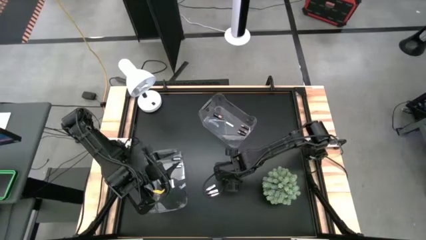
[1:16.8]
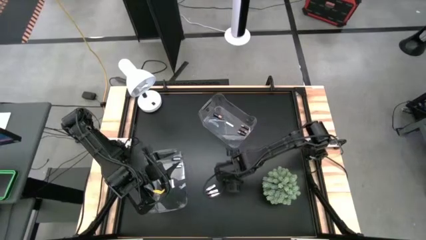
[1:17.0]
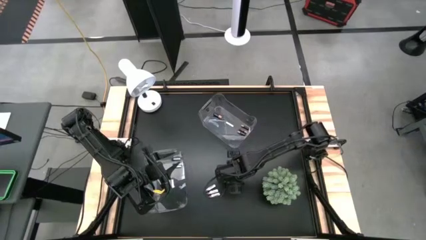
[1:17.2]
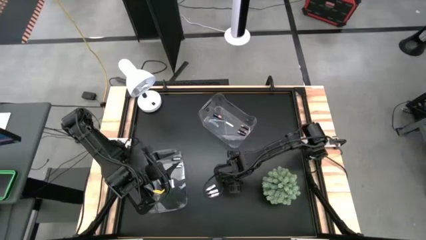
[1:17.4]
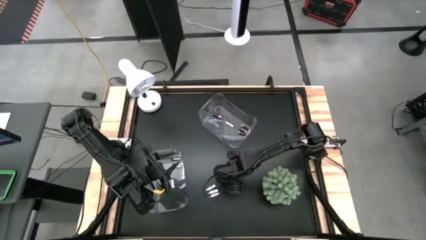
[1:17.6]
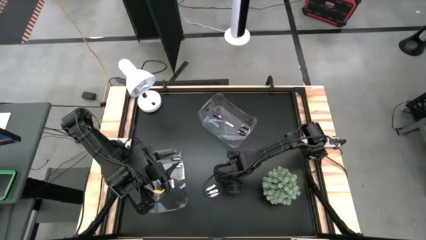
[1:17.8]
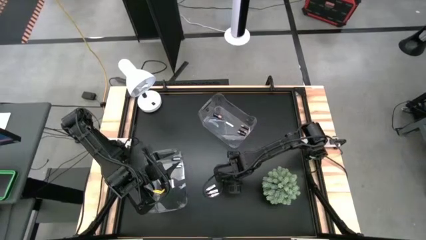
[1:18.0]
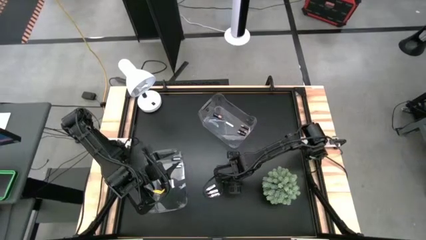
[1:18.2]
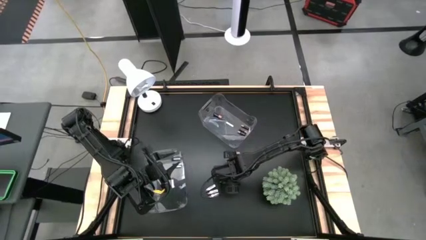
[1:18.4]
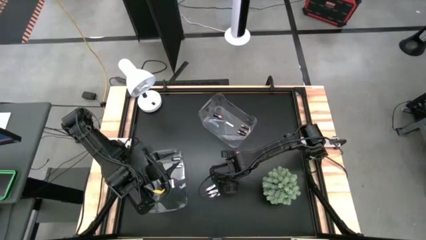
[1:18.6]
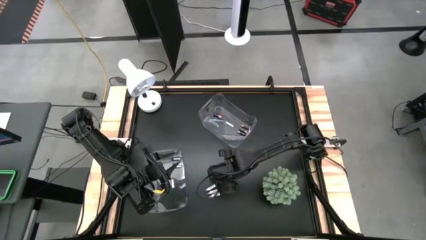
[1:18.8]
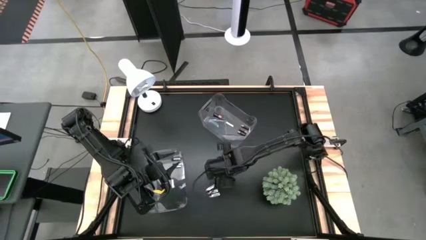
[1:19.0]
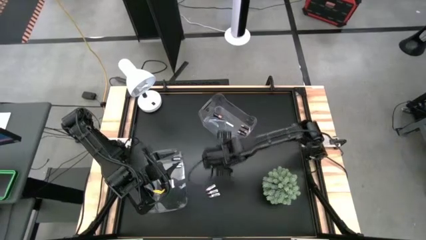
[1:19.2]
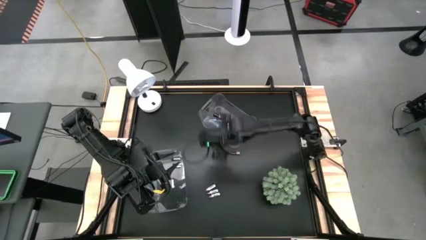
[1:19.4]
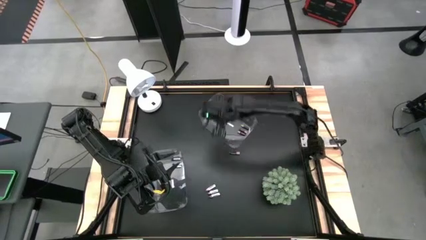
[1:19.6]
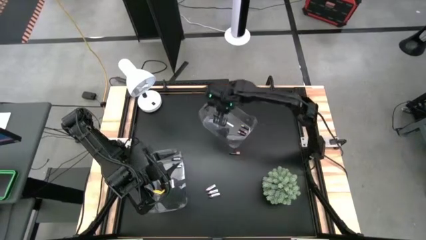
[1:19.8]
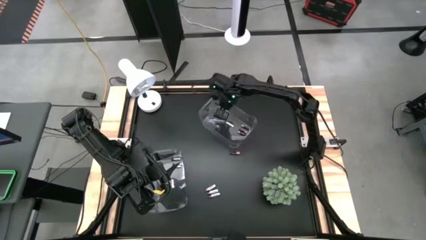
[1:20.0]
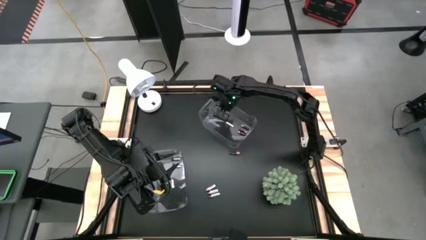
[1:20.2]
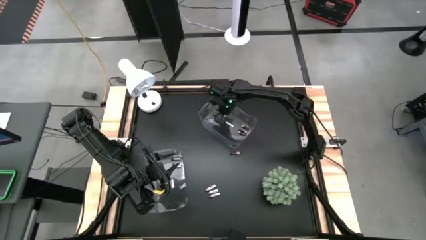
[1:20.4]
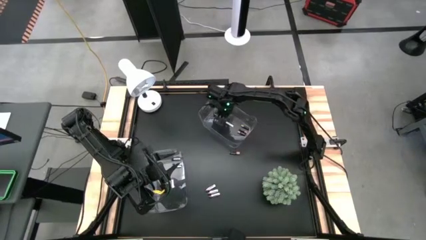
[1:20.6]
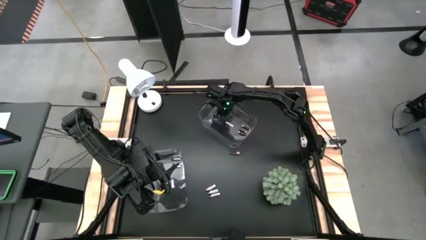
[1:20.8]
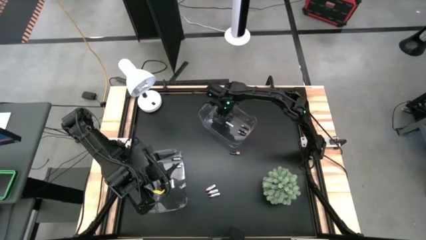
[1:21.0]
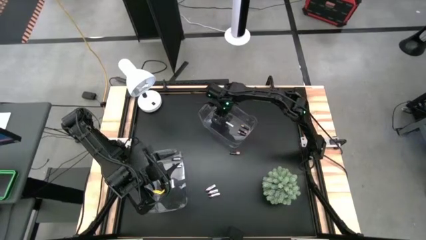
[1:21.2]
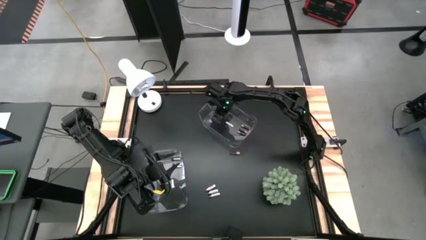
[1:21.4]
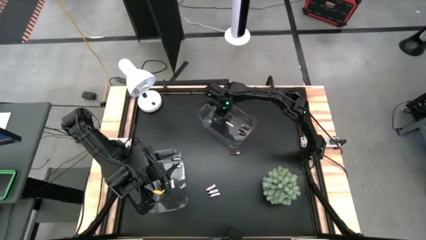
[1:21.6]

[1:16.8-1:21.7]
Task: Sort batteries
Put the black battery into the top transparent bin

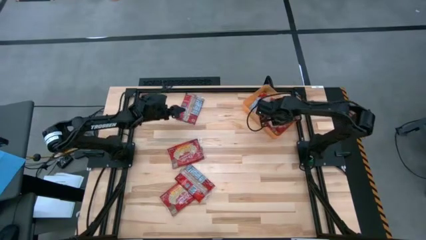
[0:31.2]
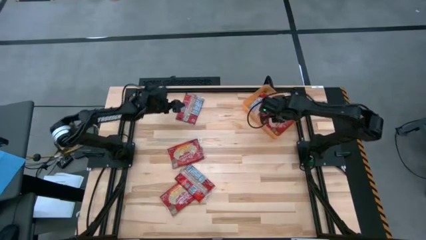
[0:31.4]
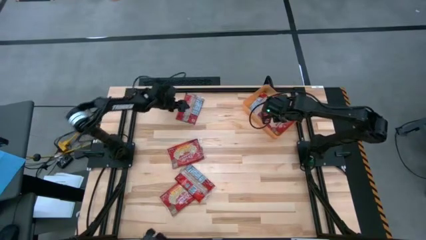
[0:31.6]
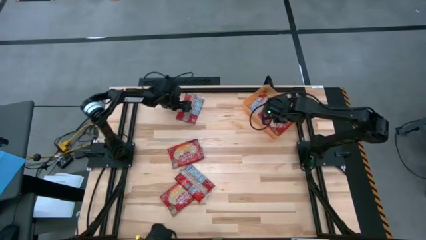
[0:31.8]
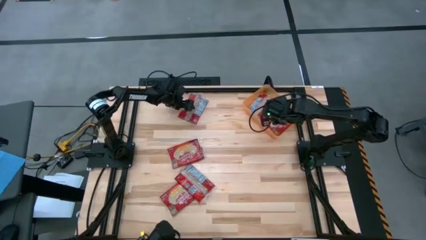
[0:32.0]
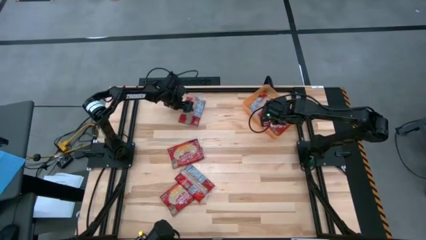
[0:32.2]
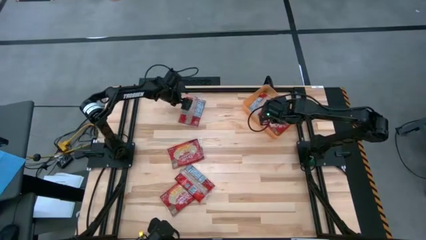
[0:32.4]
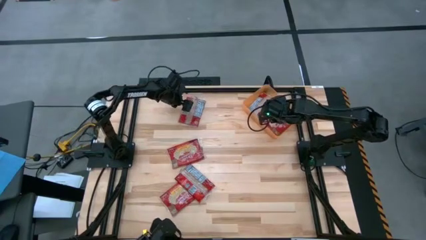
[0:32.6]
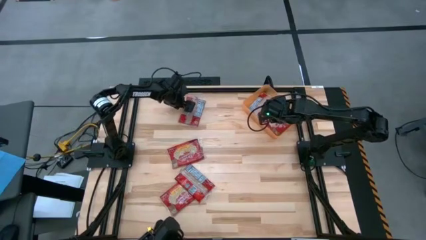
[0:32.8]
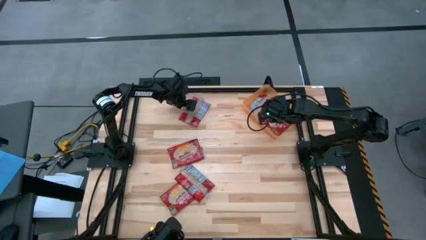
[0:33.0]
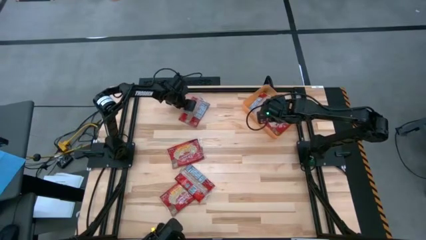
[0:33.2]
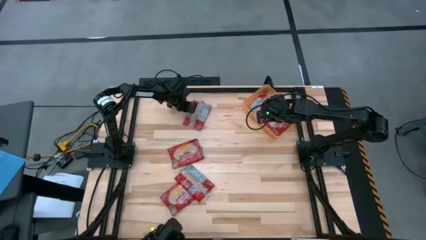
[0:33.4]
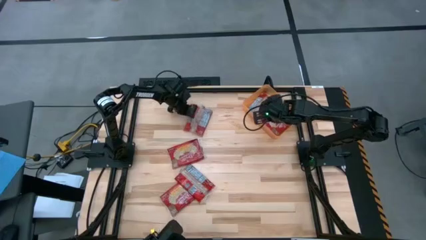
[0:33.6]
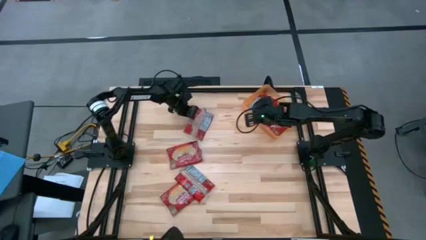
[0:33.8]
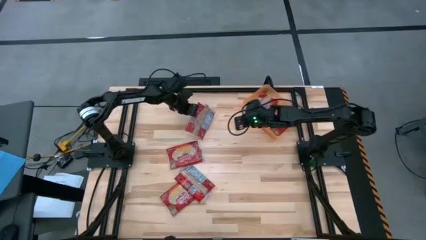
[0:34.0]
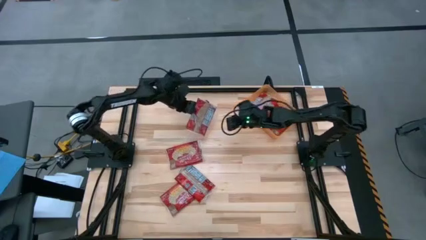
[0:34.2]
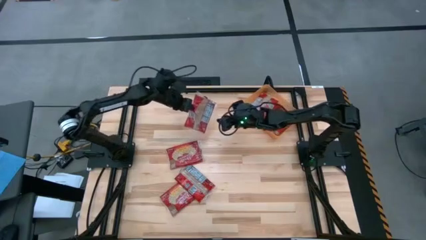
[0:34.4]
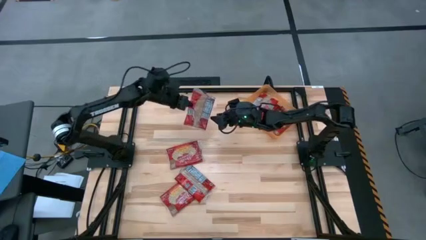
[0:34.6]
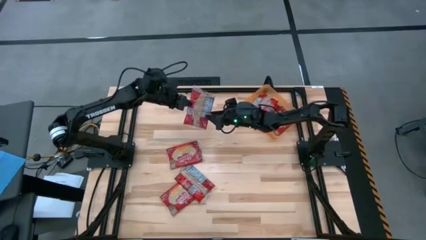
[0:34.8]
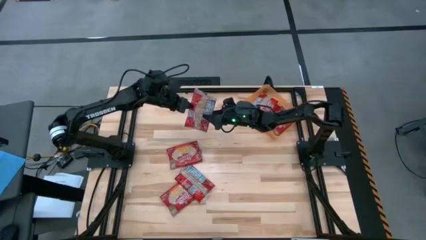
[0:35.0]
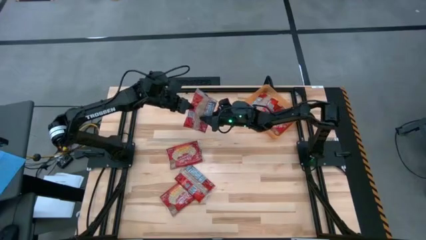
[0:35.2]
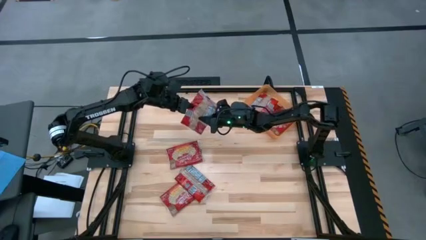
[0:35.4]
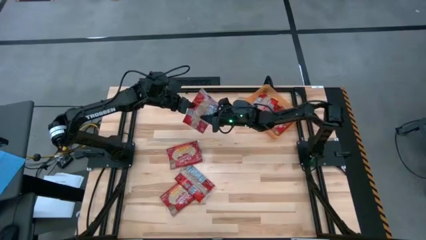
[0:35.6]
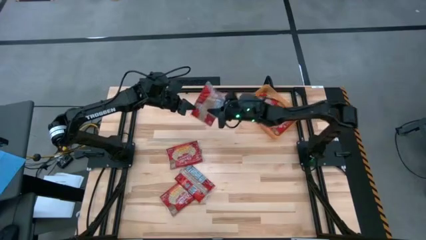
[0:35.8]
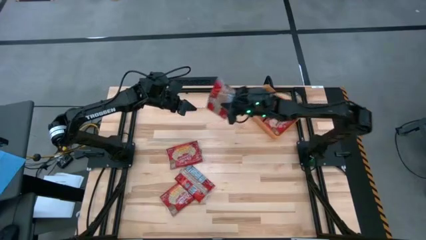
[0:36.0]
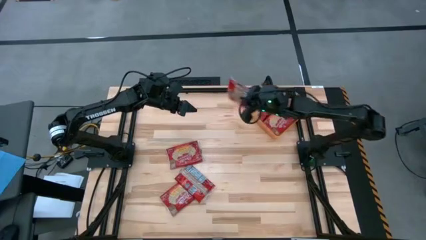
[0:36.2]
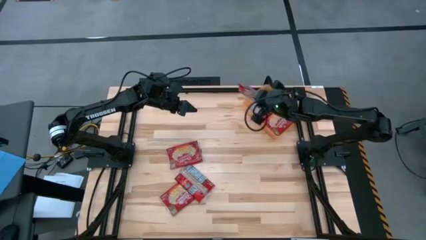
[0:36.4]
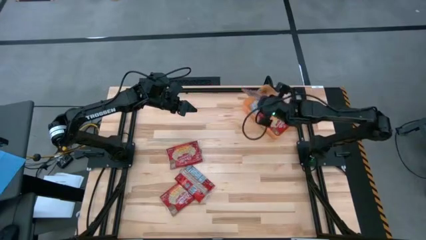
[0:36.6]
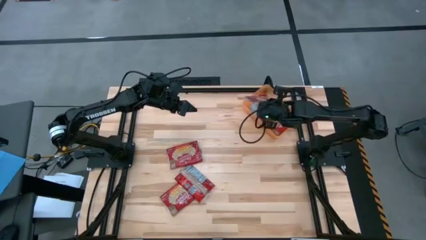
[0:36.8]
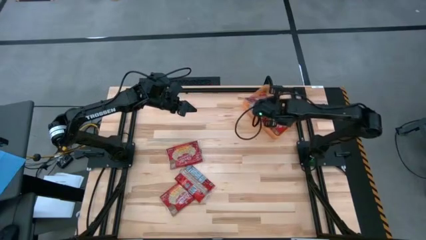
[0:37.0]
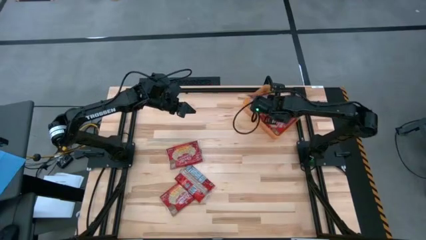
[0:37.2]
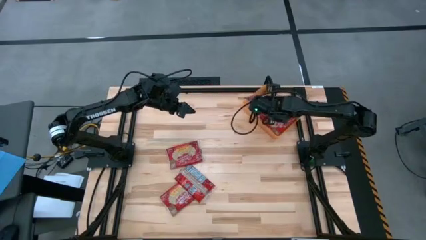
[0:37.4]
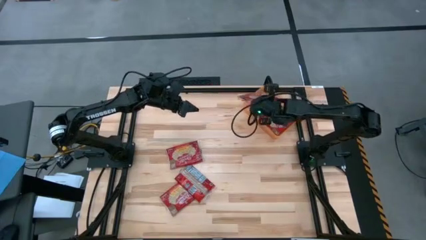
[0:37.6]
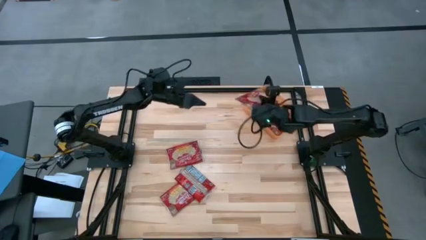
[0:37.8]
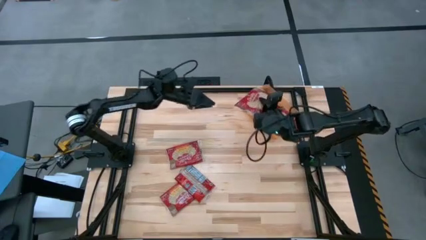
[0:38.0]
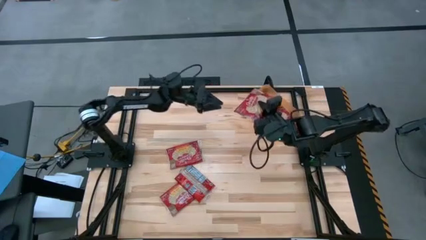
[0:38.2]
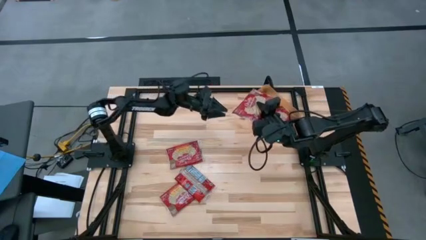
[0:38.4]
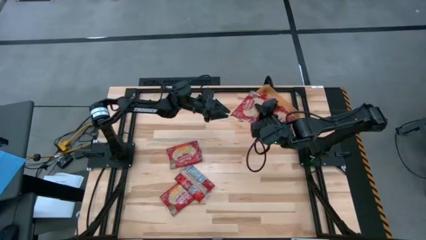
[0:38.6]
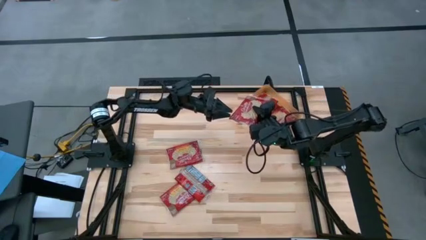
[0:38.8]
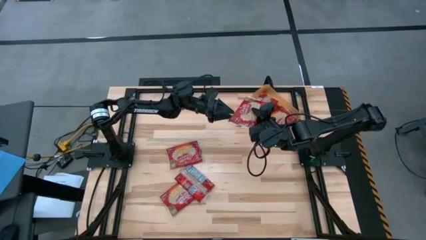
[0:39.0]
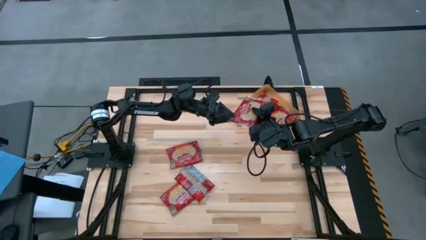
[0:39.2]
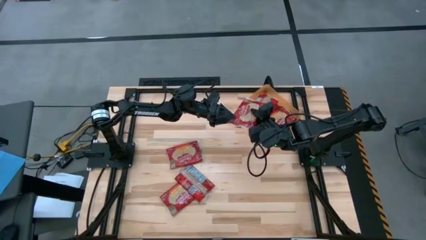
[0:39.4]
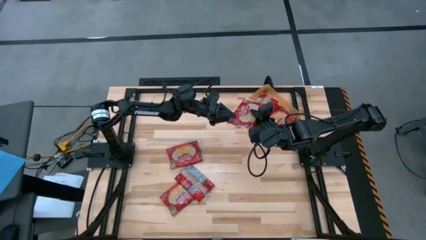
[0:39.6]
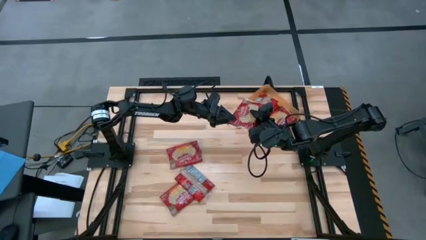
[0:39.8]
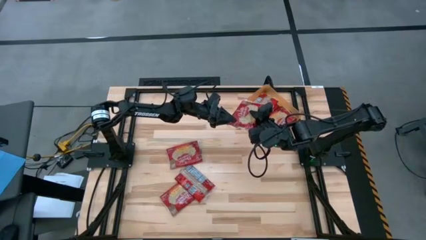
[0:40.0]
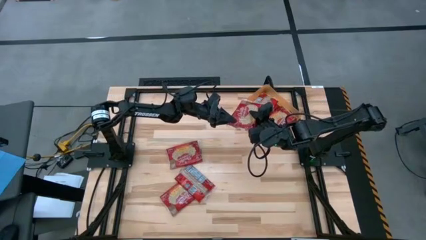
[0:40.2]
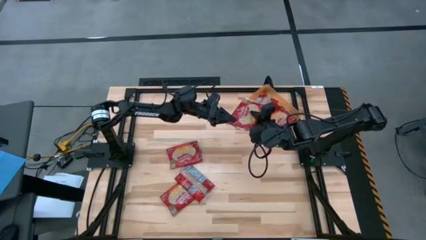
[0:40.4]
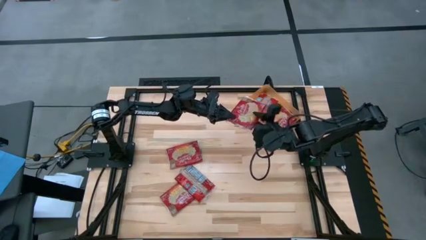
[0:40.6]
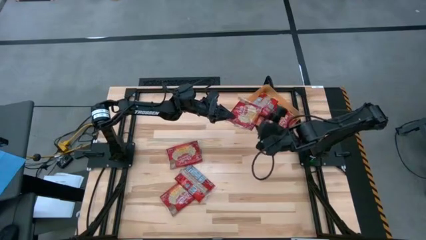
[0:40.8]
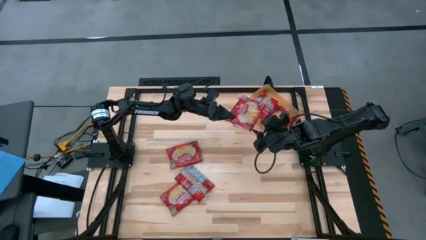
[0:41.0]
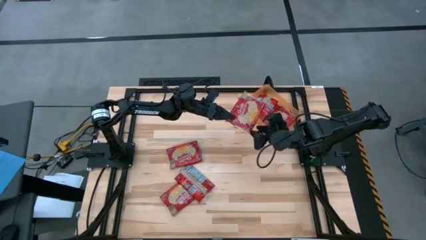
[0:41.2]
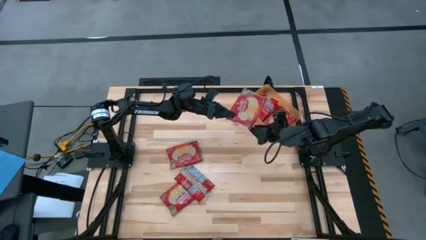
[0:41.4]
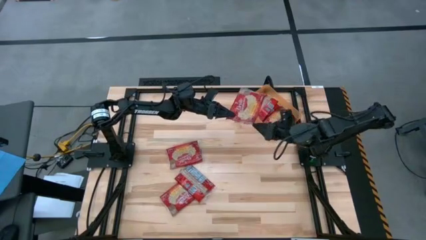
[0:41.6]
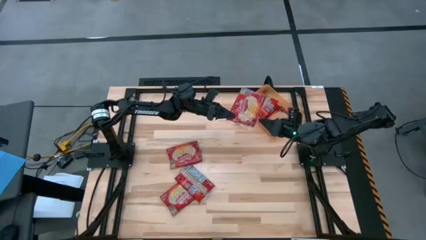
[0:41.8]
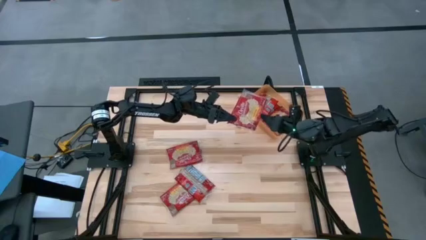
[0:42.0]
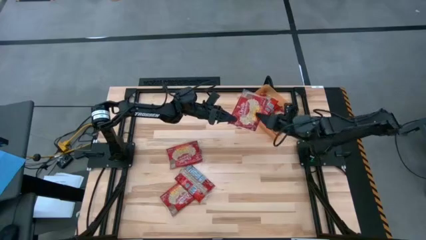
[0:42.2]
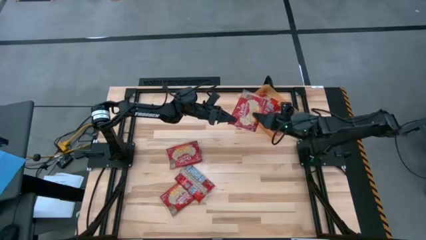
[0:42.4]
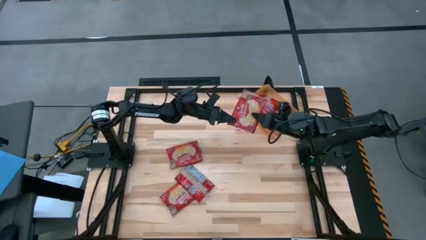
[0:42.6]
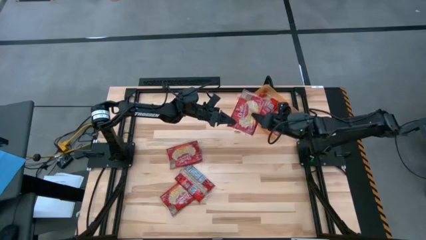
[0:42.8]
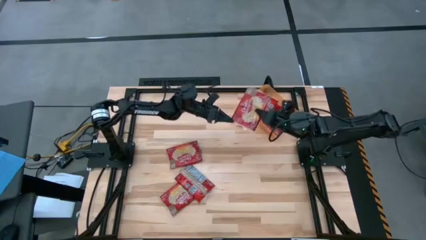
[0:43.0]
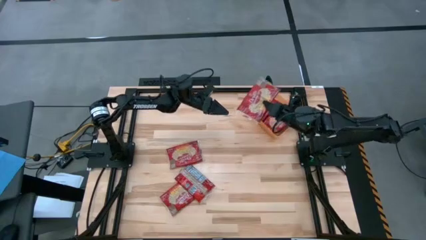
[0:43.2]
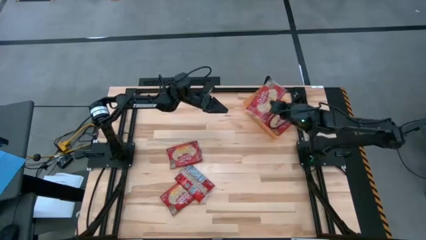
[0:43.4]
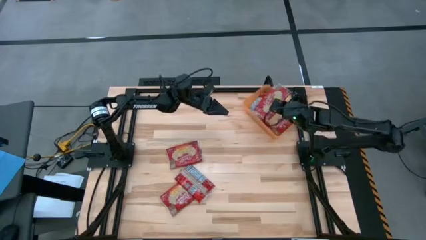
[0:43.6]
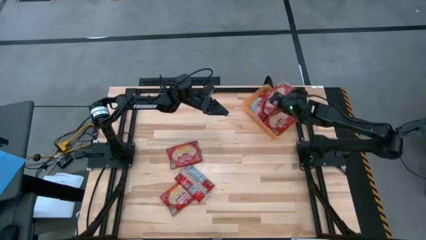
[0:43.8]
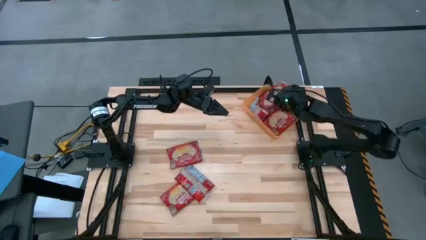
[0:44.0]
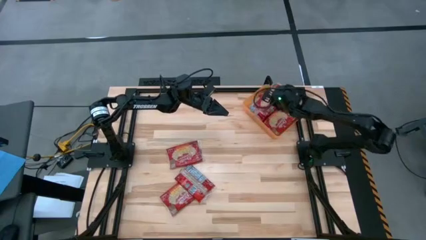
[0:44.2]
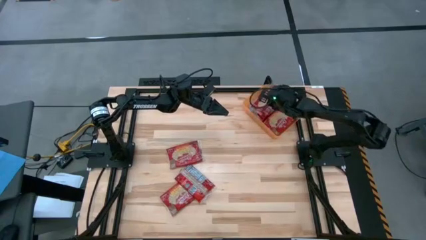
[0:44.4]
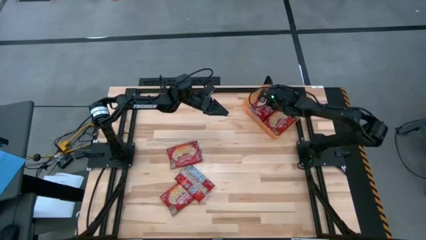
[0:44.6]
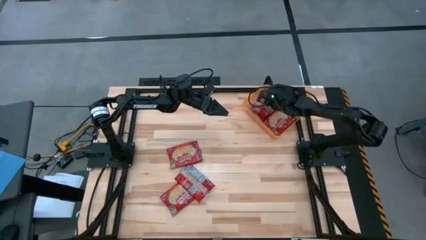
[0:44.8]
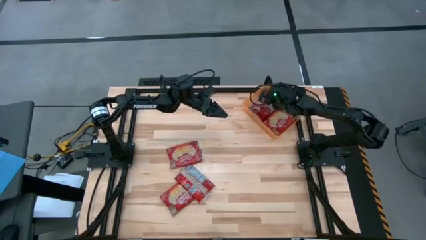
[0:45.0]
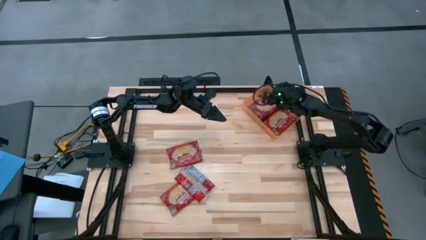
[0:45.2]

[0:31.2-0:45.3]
Task: Sort popcorn bags into baskets
Put the red popcorn bag into the orange bin
